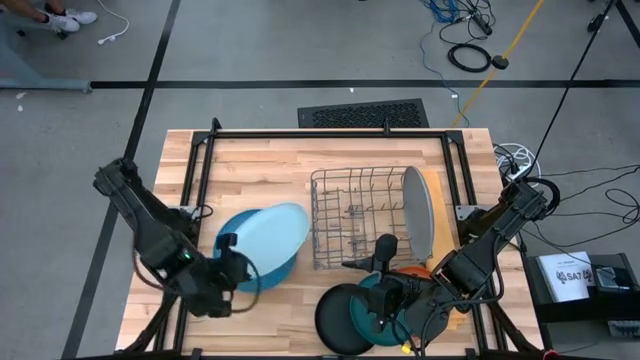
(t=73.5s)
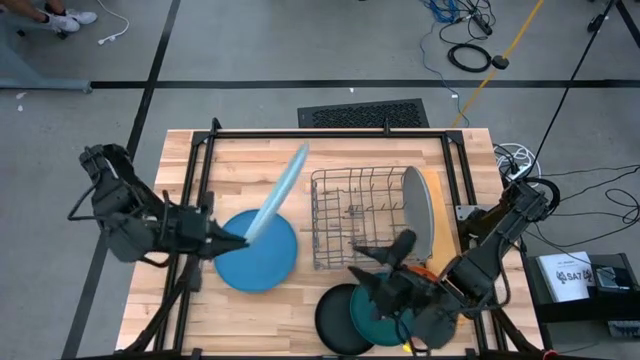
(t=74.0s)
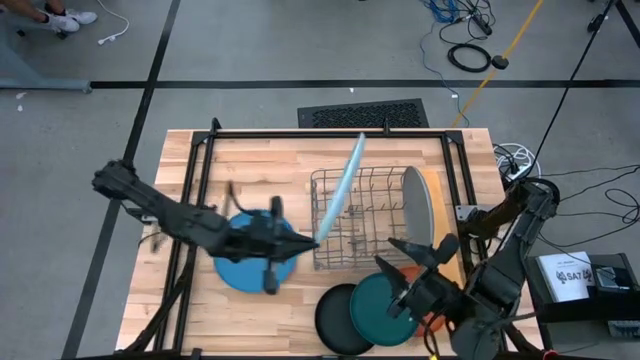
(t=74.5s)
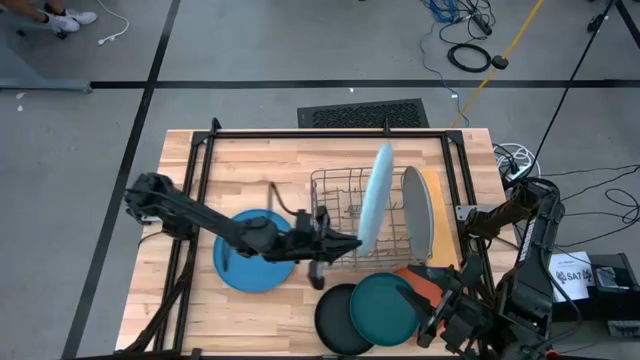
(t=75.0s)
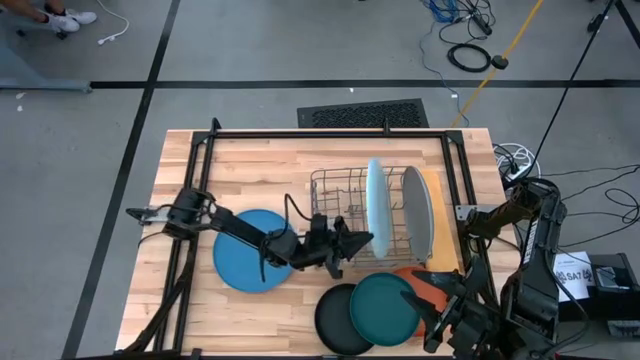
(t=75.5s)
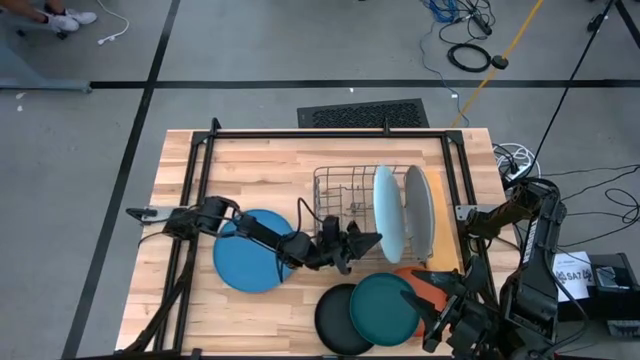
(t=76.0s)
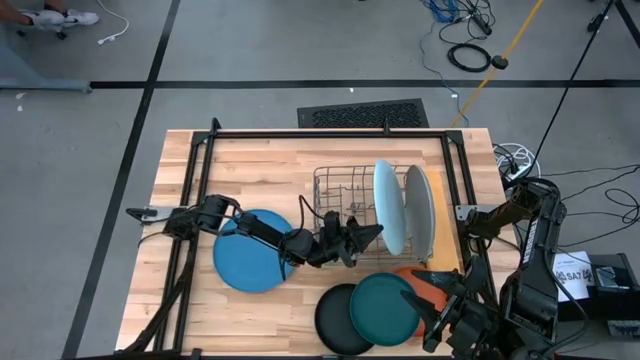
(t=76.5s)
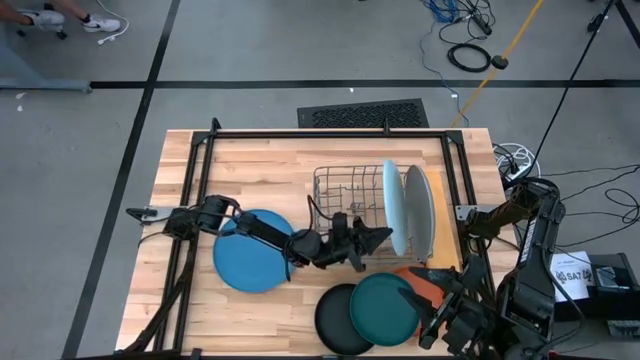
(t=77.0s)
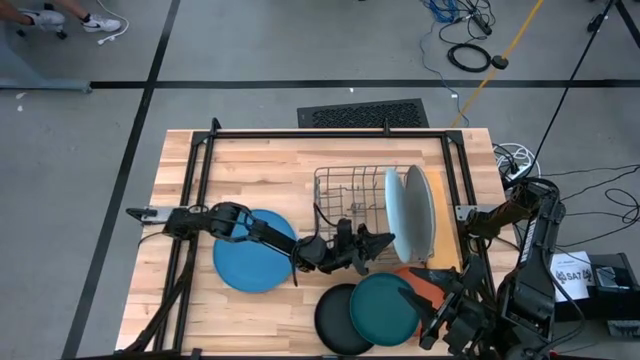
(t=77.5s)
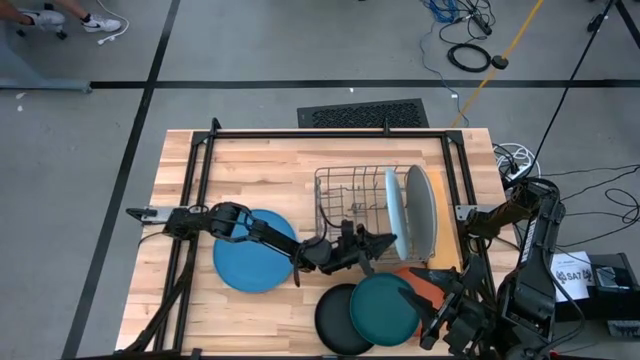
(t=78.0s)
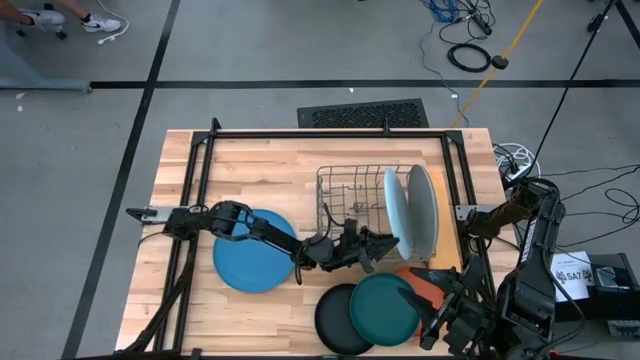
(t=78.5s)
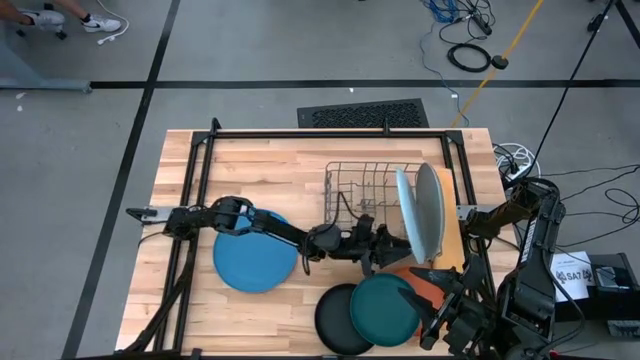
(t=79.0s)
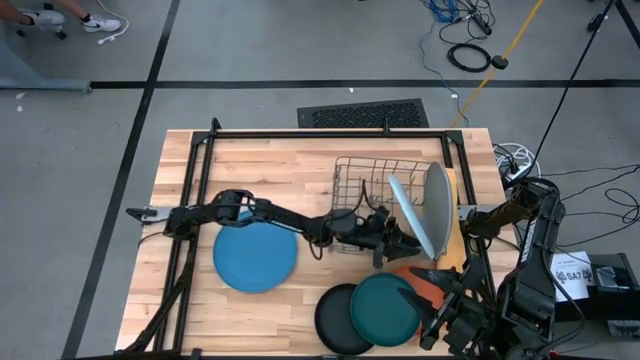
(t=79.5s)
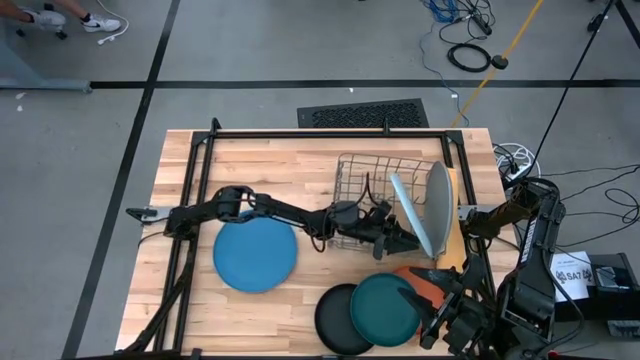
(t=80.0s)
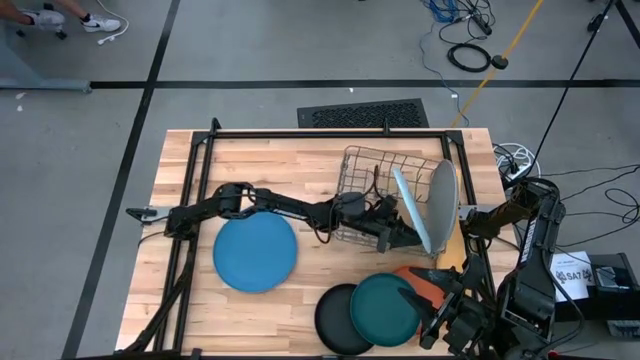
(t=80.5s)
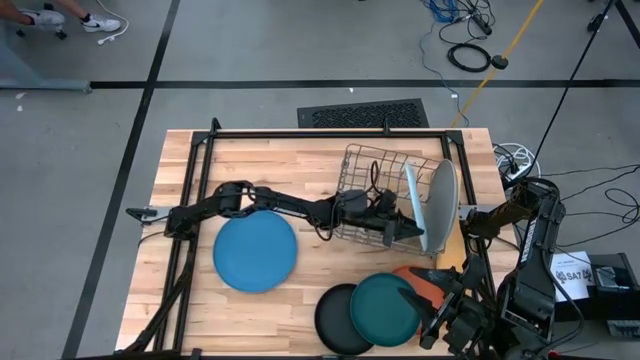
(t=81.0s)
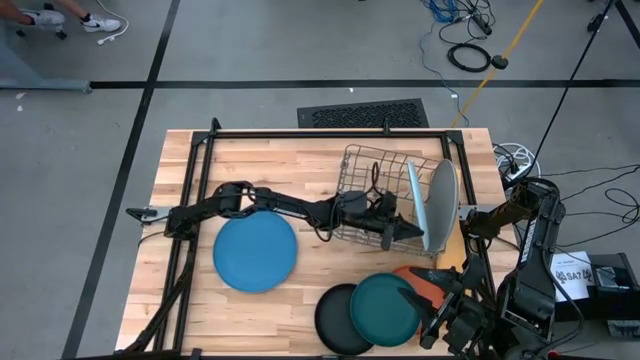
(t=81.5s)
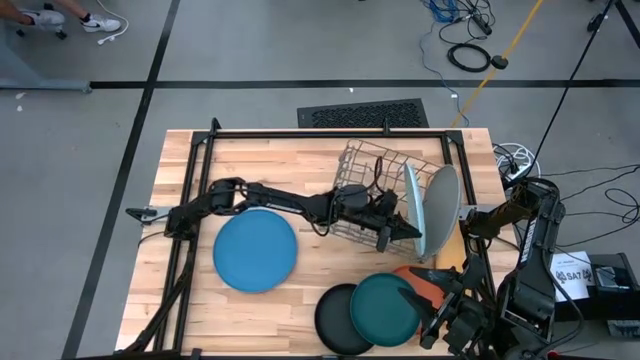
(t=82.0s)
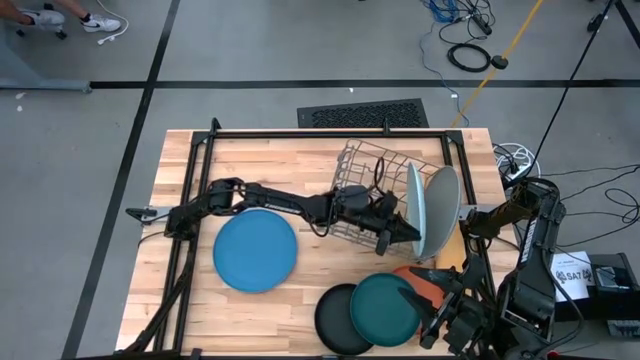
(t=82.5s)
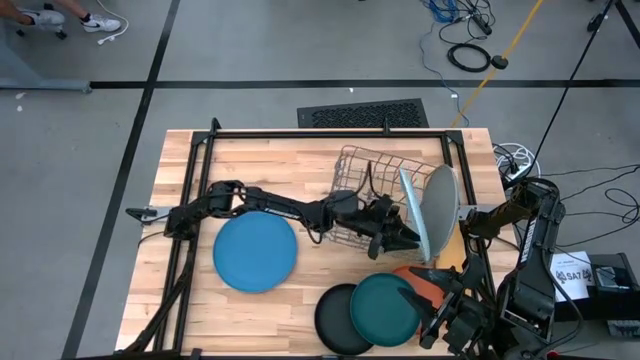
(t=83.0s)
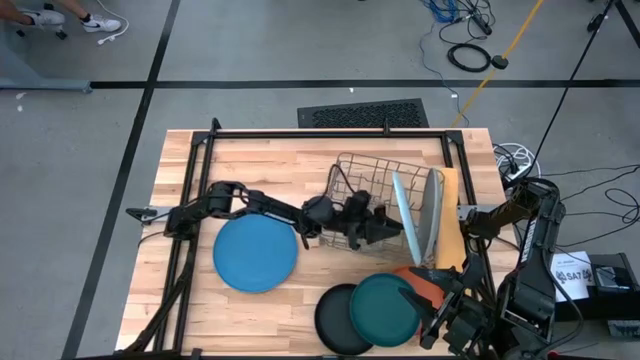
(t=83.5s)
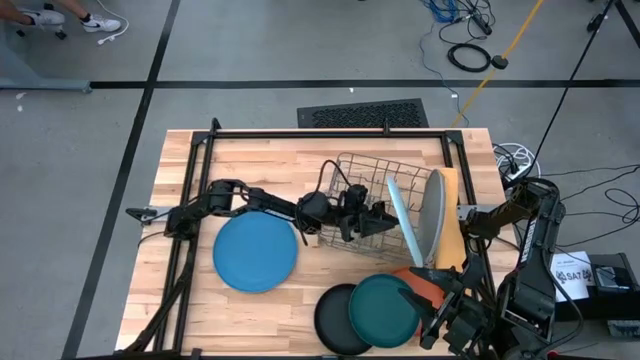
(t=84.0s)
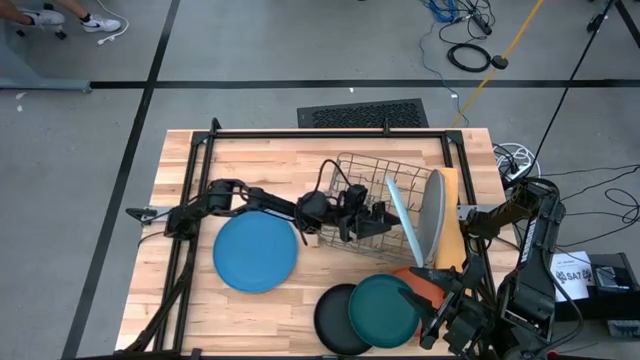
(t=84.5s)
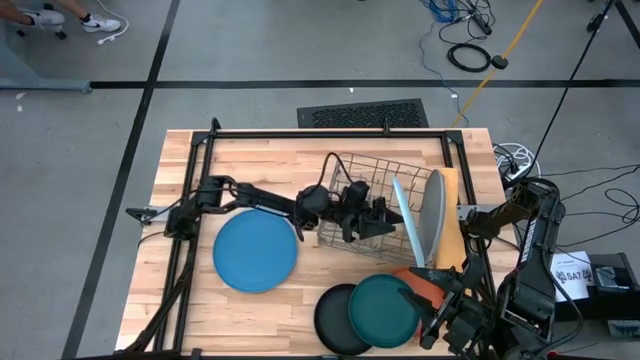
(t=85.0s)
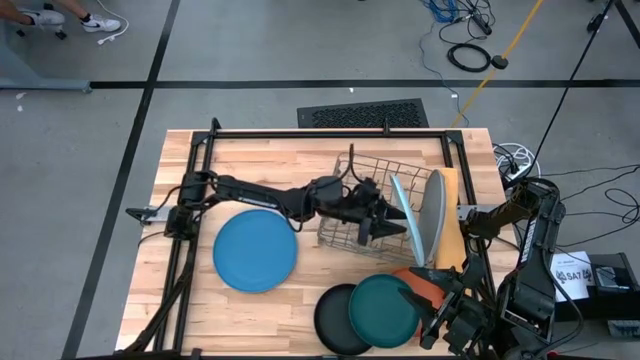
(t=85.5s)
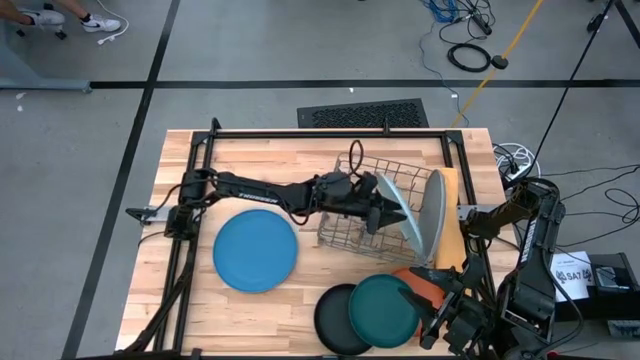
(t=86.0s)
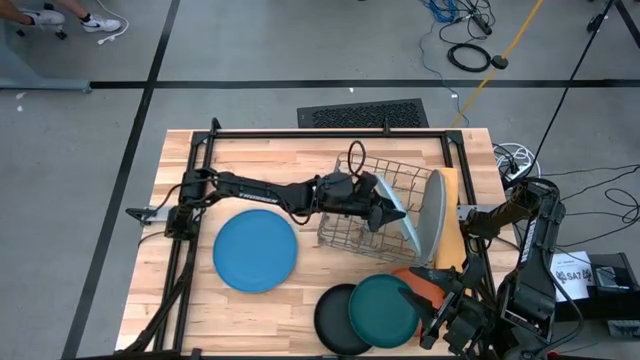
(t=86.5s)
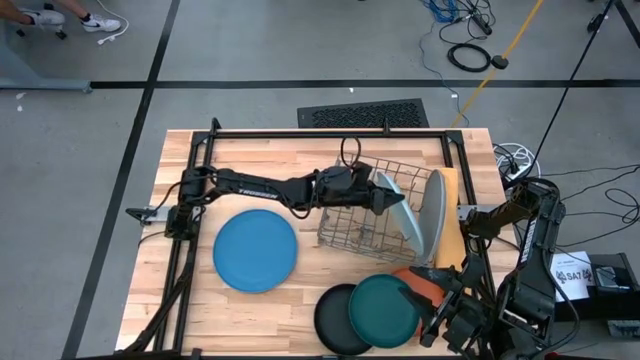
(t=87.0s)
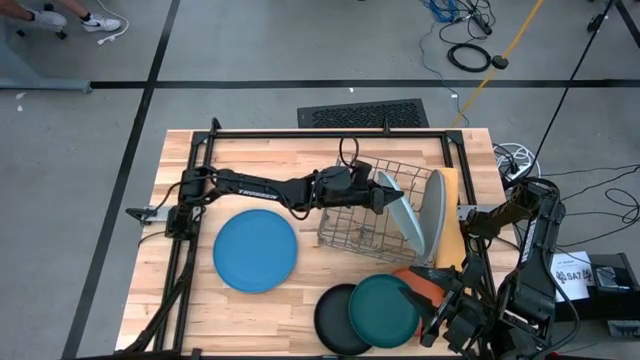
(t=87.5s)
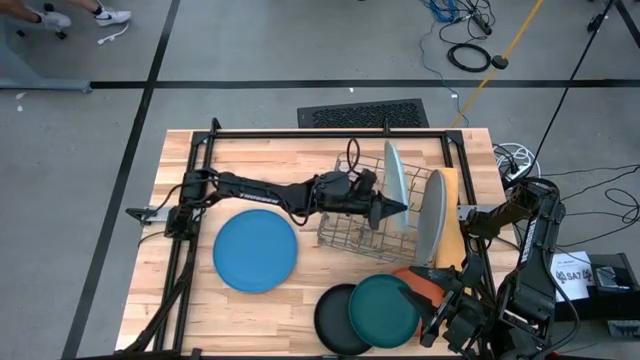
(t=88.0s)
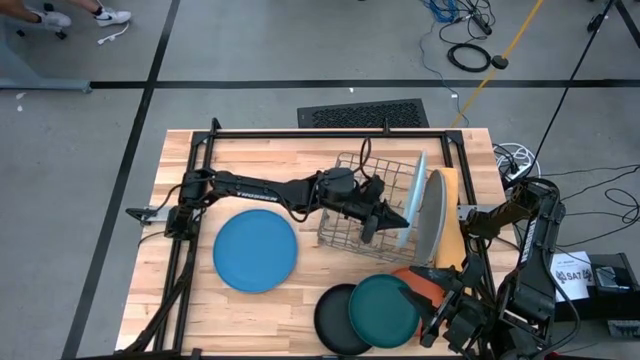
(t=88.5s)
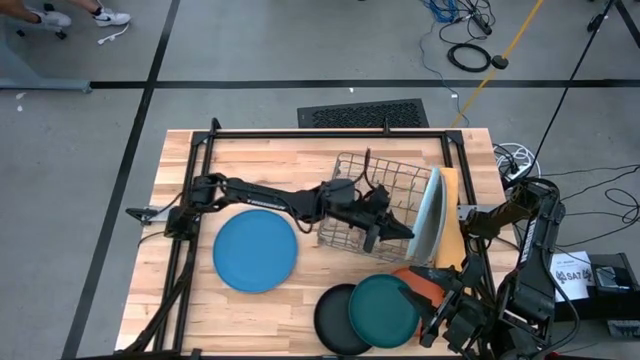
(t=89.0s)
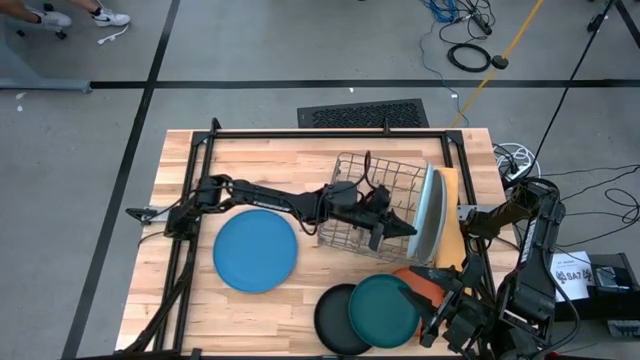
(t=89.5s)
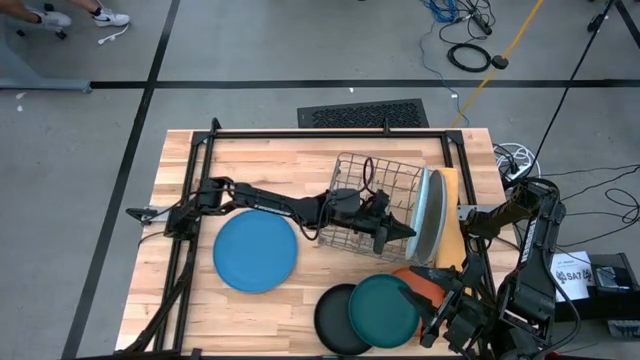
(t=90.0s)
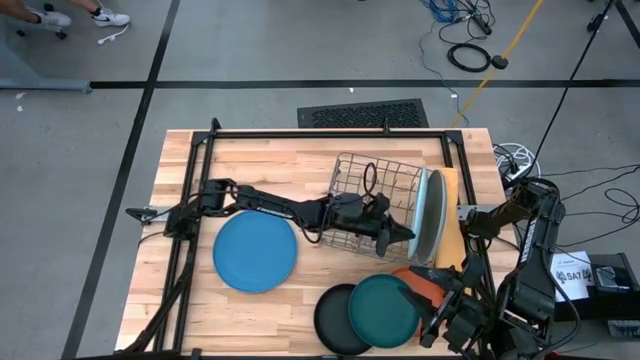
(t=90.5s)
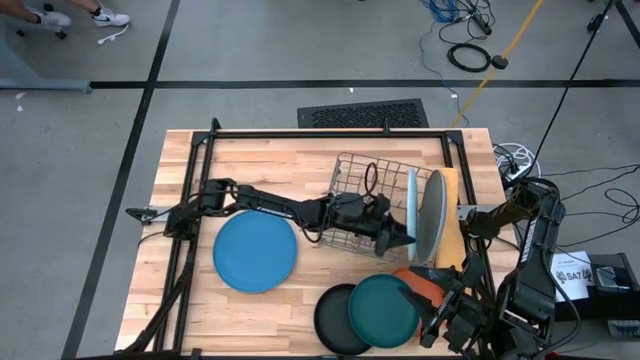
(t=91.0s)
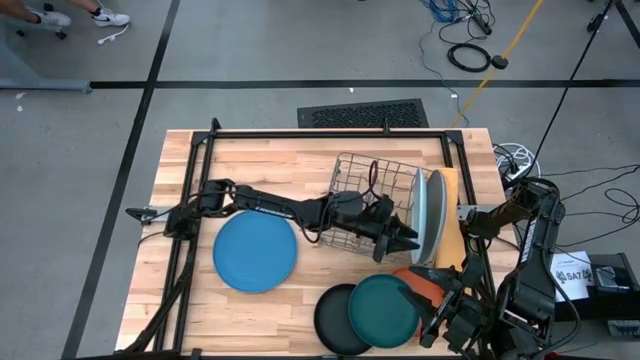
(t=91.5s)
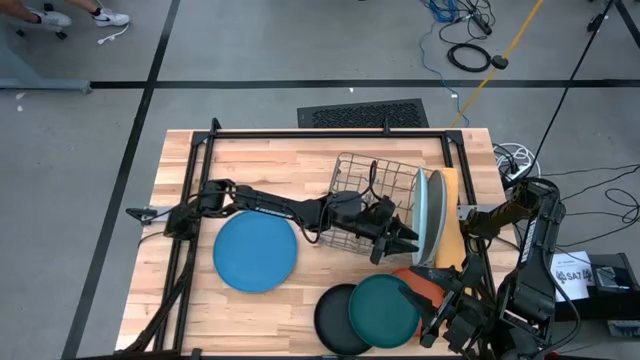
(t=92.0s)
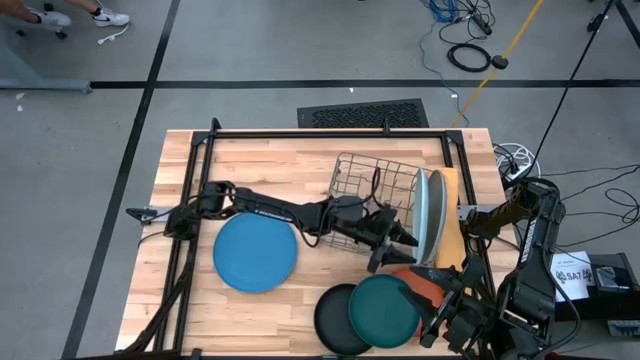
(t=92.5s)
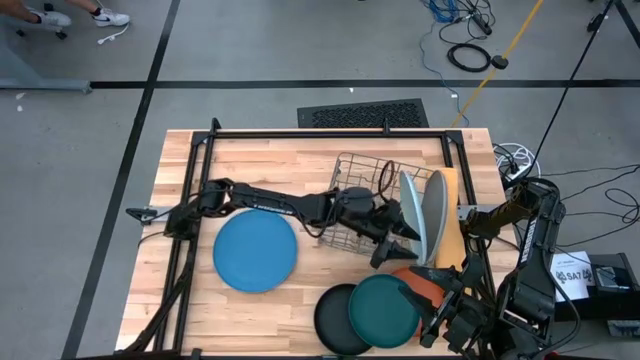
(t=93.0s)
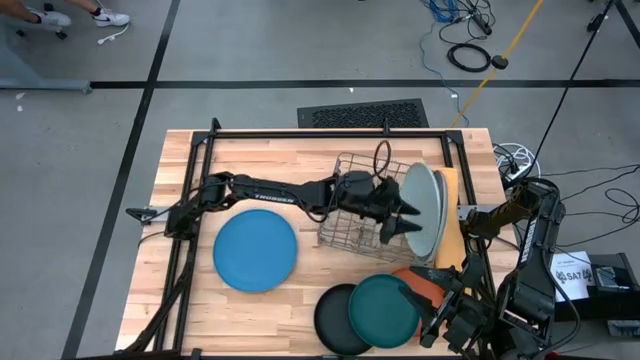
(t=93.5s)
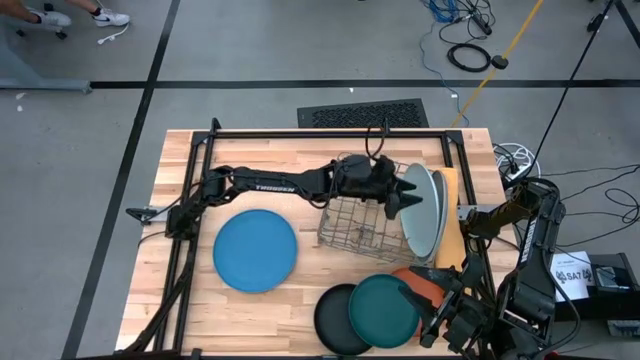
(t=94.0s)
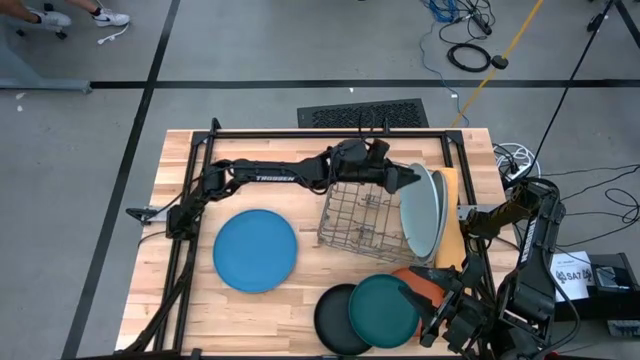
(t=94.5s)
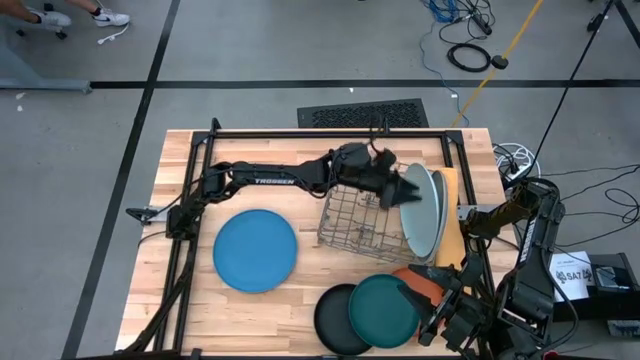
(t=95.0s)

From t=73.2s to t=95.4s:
Task: Sort dishes
Put the light blue plate into the dish rack
